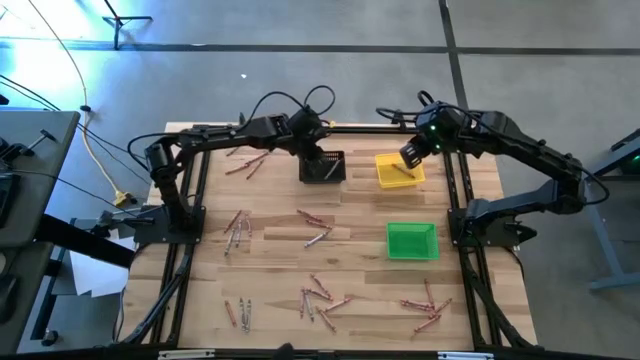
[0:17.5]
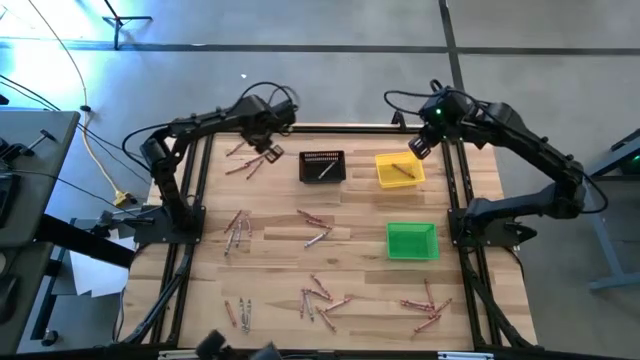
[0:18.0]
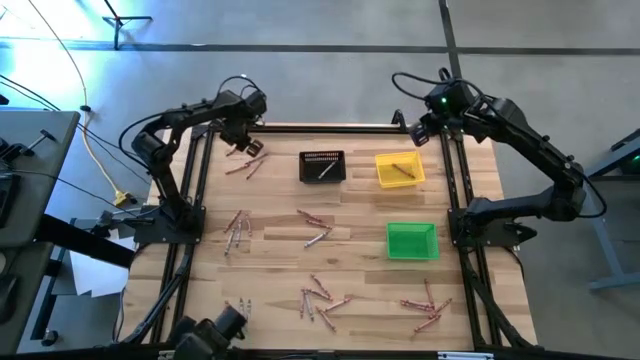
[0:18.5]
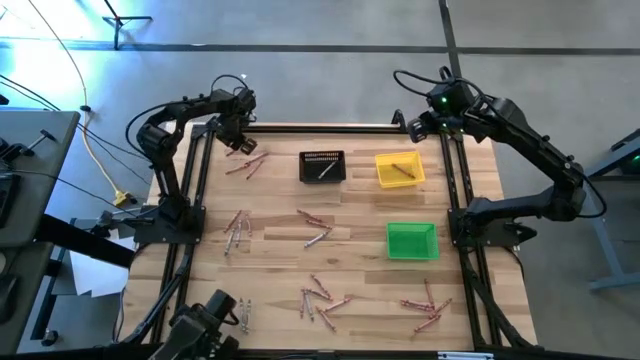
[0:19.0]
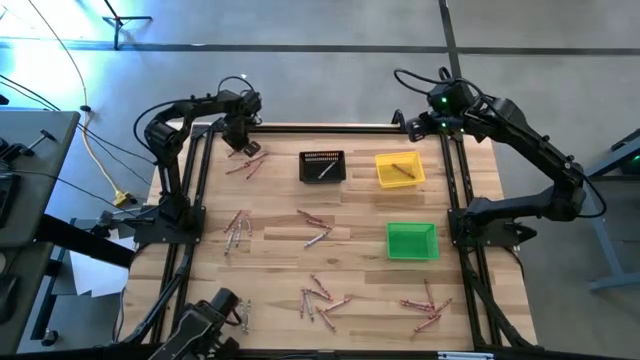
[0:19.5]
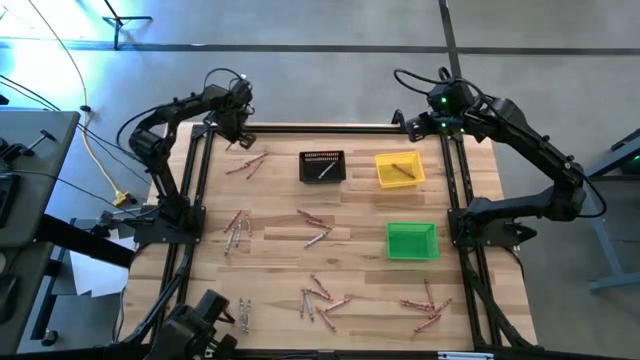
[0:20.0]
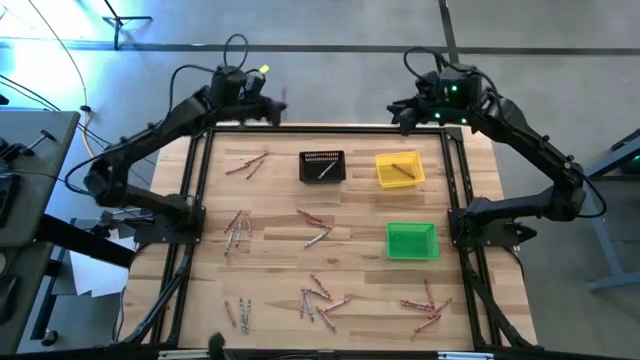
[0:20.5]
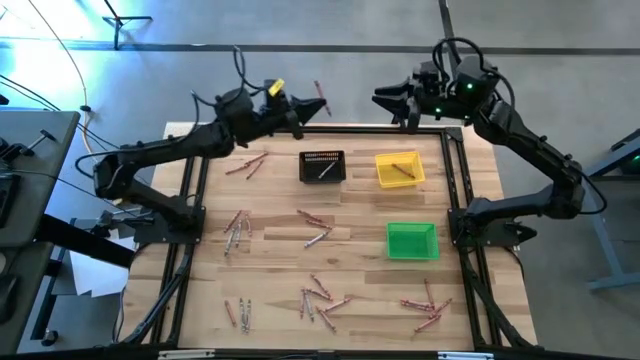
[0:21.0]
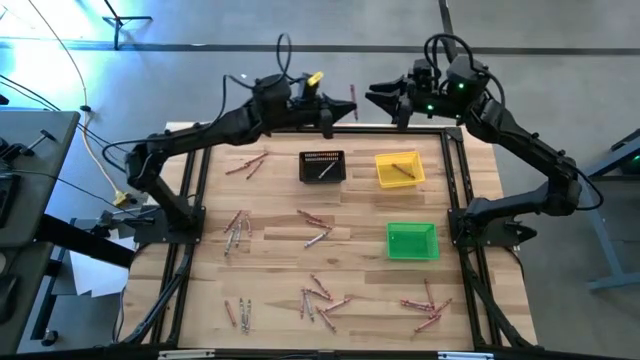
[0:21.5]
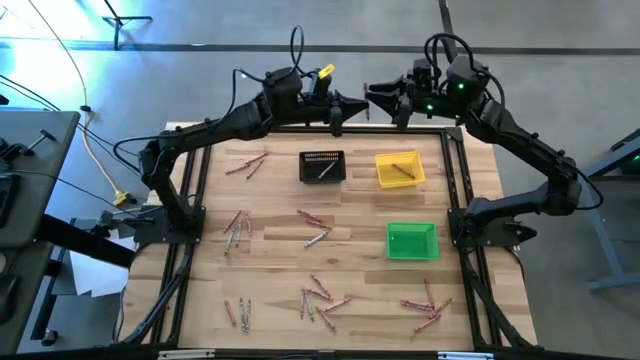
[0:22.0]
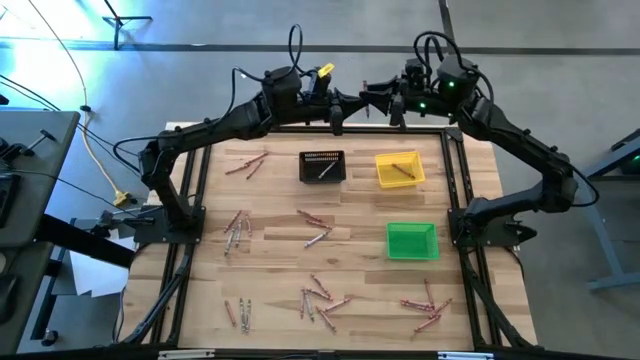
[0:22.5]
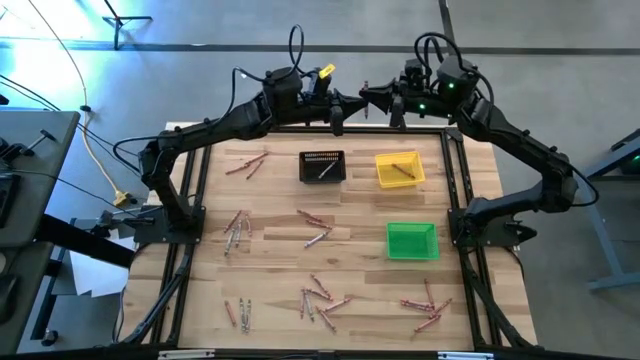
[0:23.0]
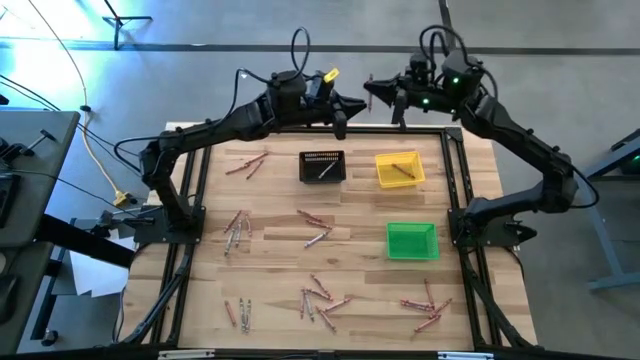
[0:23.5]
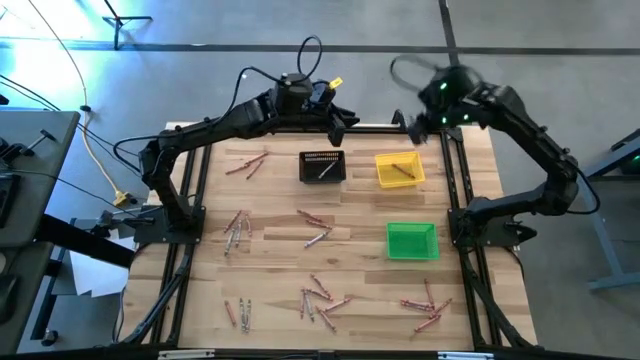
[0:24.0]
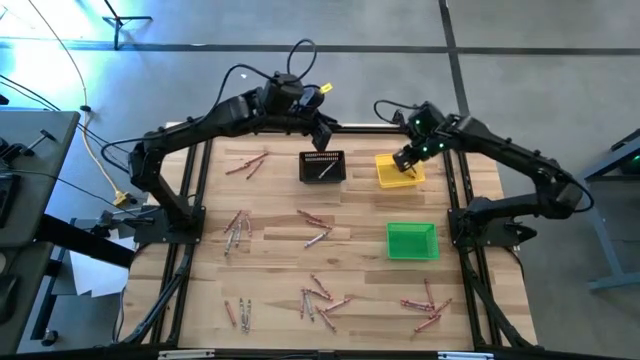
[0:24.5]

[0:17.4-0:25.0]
Task: Sort crayons
Put the red crayon into the yellow basket

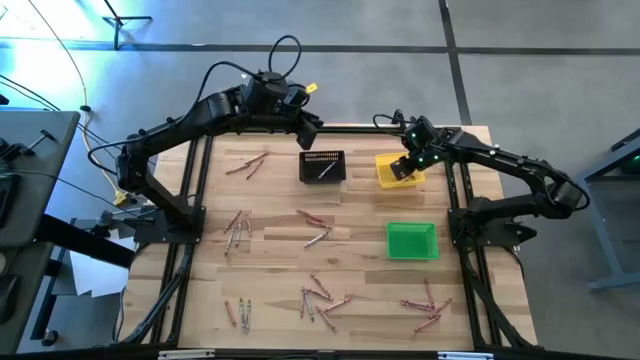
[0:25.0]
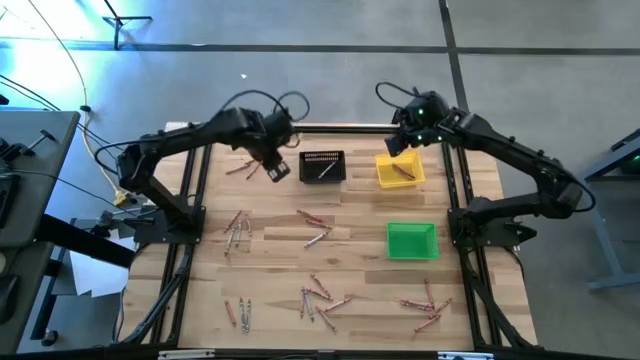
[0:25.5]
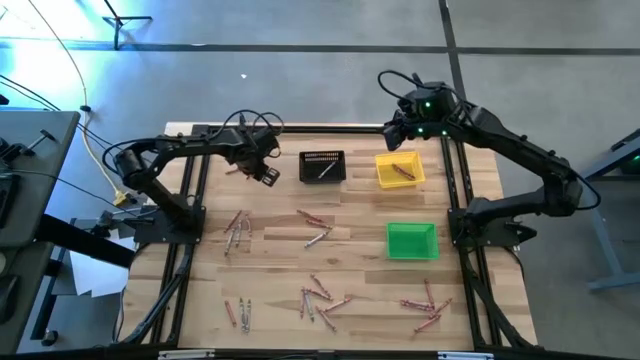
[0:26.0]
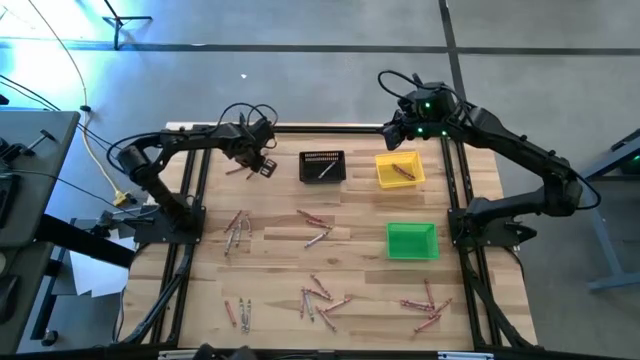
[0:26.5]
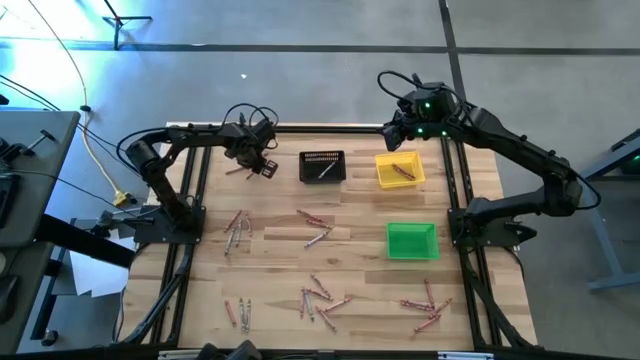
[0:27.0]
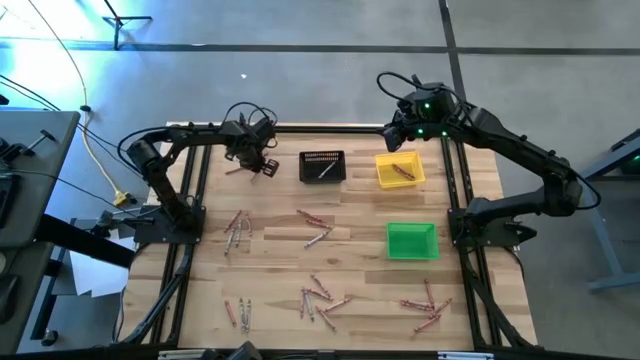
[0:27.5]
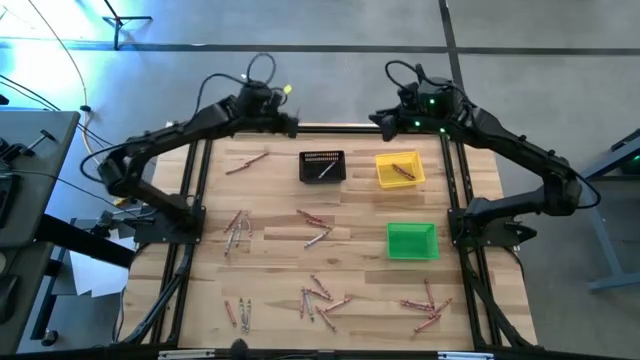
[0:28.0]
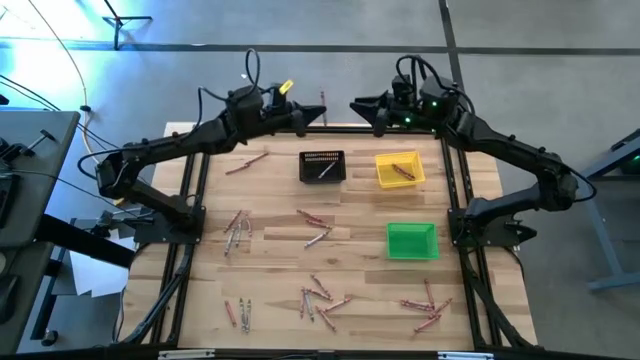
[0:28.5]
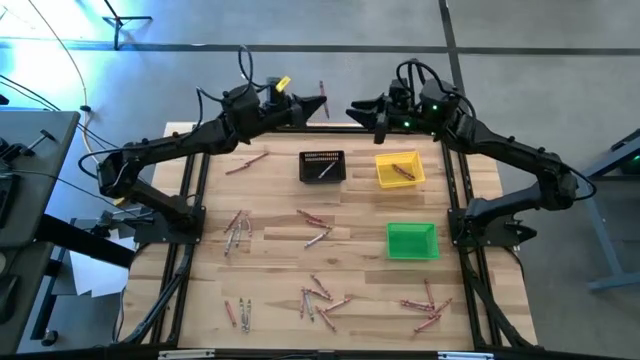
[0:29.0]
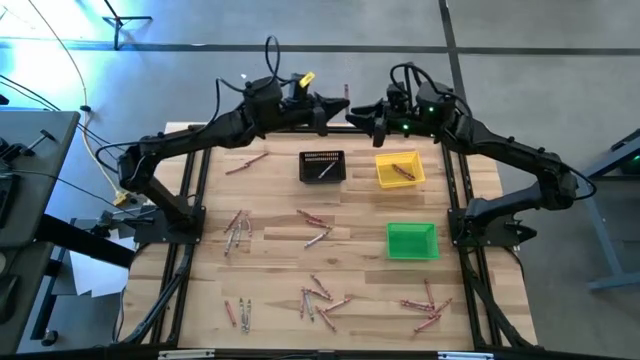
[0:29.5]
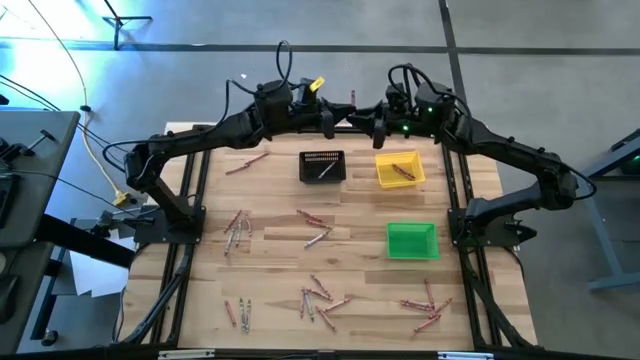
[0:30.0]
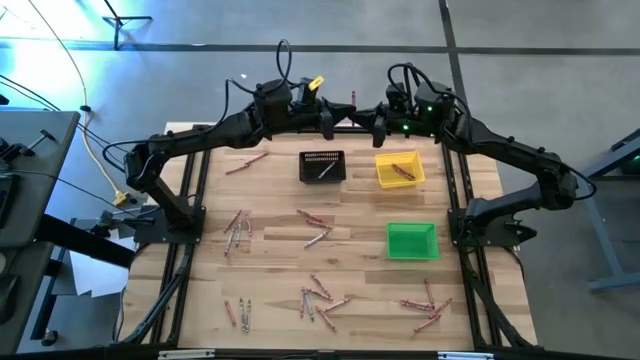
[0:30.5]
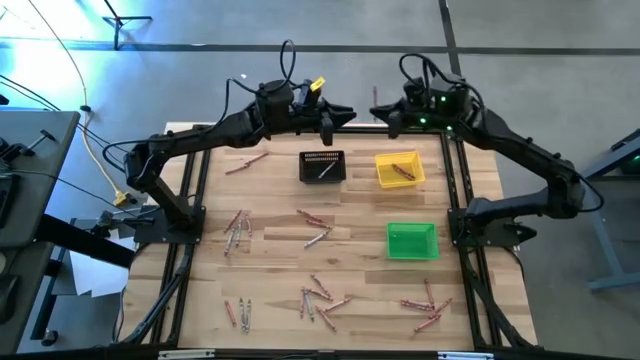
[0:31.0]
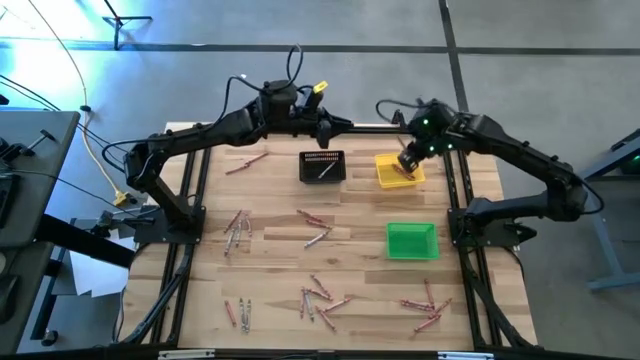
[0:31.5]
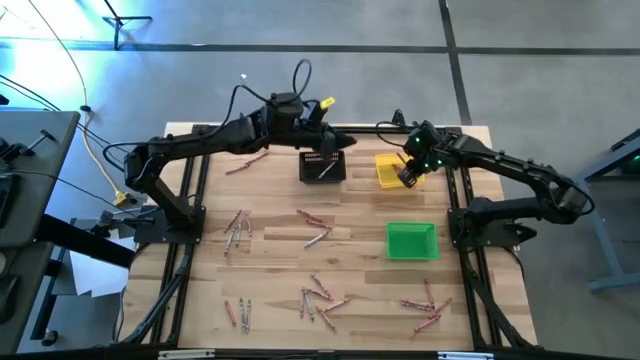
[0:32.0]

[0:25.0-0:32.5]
Put the red crayon into the yellow basket

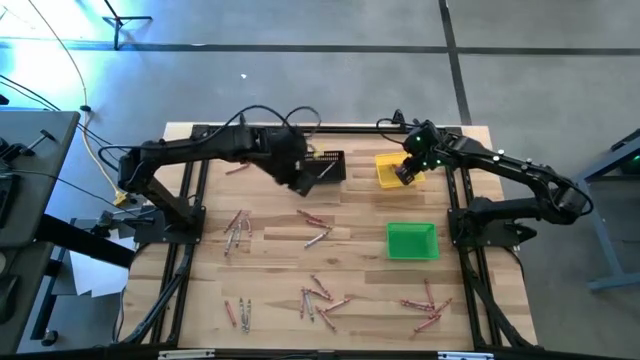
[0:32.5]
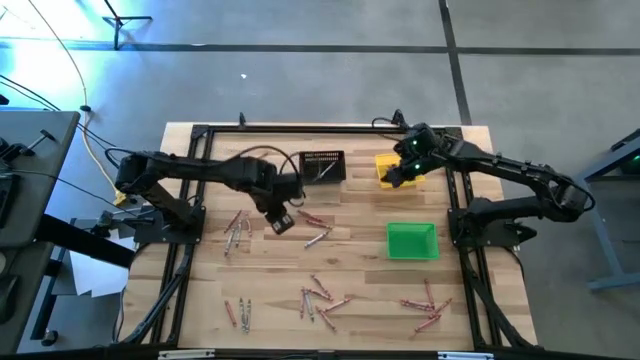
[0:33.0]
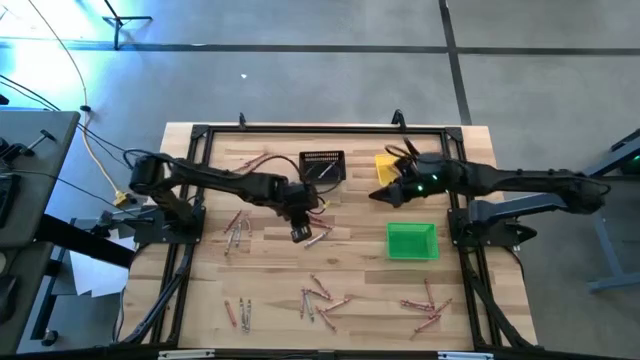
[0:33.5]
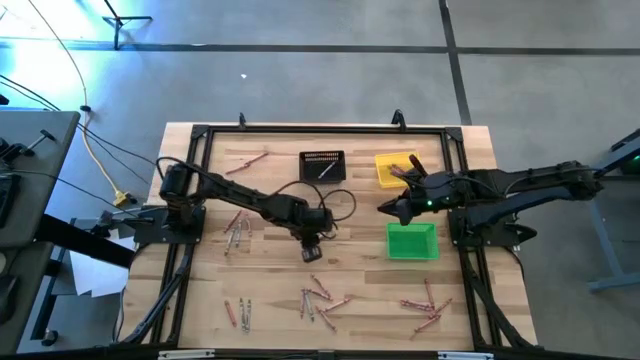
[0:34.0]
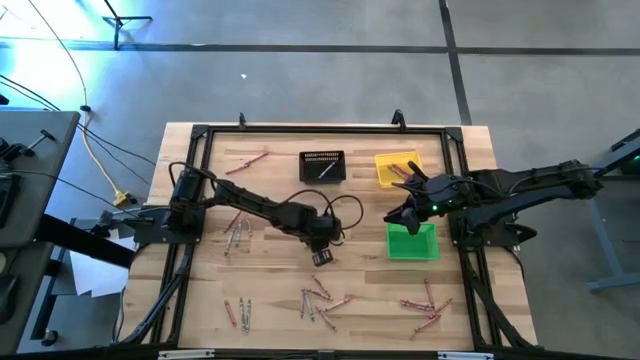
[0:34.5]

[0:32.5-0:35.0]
Put the gray crayon into the black basket

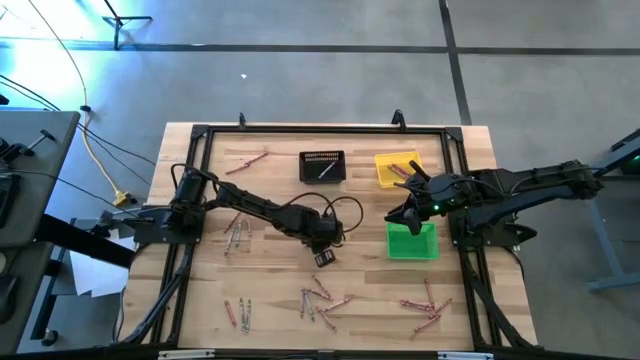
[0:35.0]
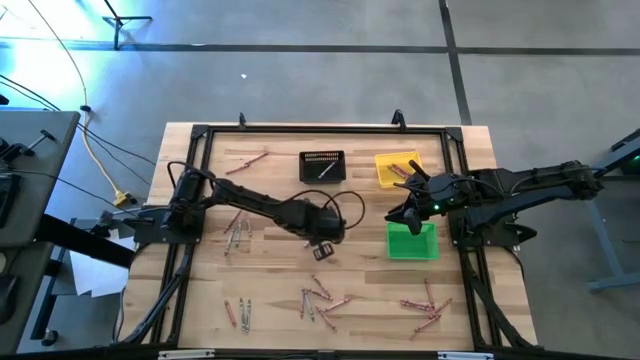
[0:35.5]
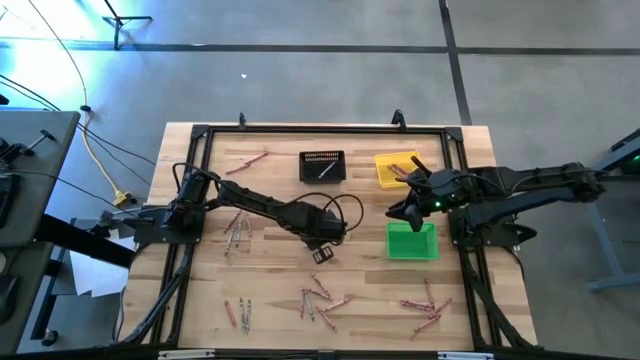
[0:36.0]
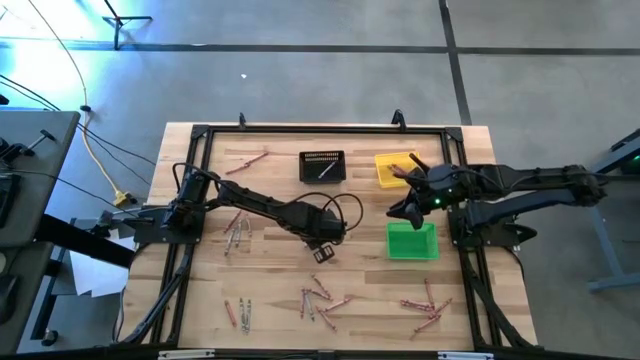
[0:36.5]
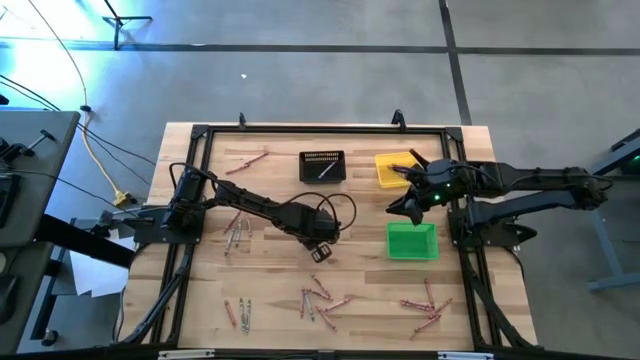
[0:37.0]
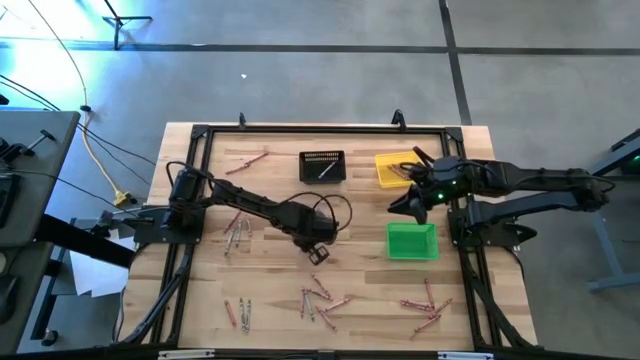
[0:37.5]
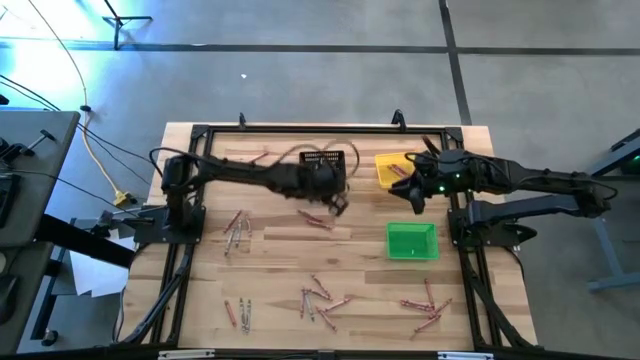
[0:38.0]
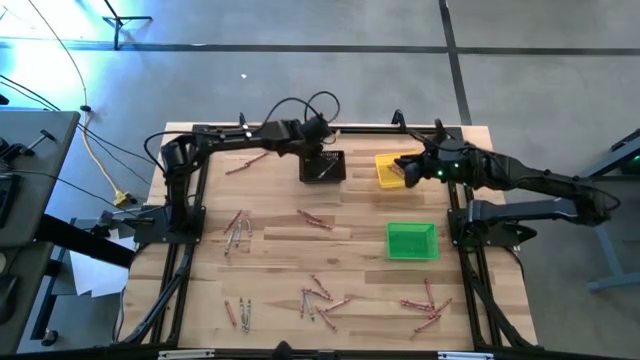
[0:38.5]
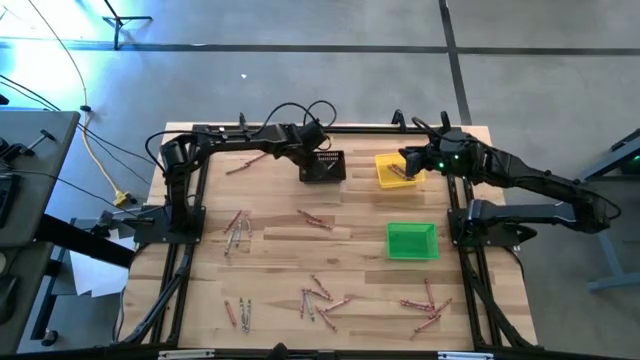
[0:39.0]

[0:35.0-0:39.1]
Put the gray crayon into the black basket
